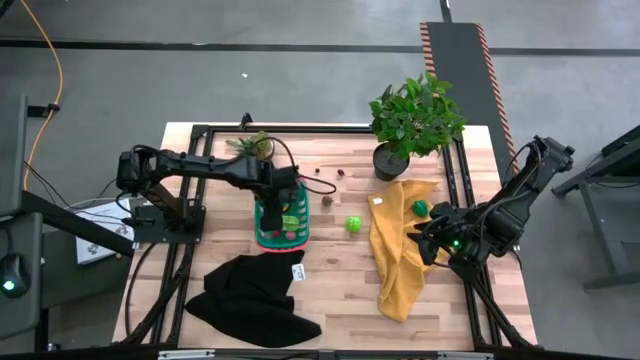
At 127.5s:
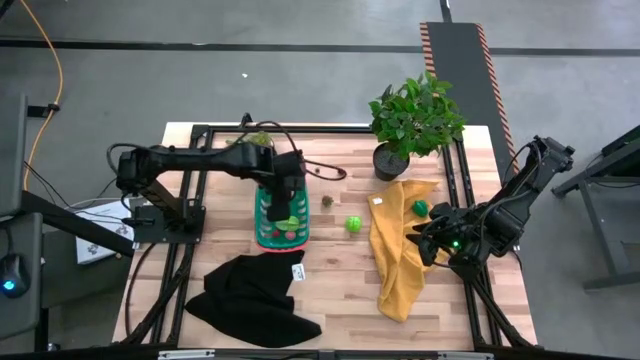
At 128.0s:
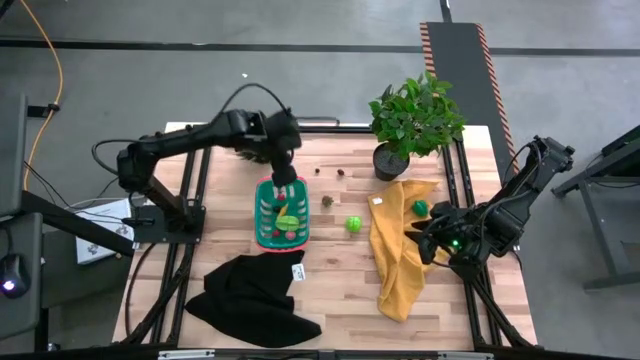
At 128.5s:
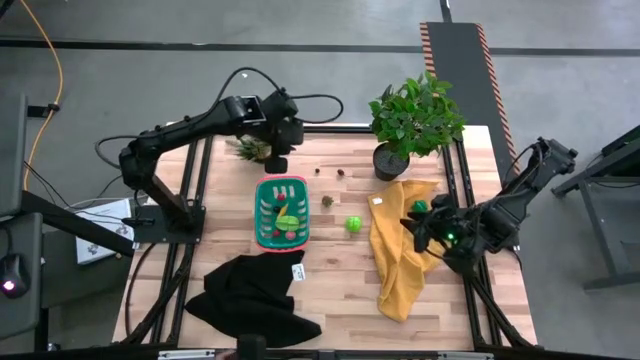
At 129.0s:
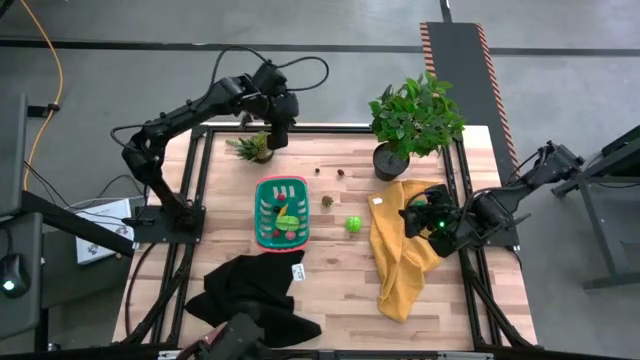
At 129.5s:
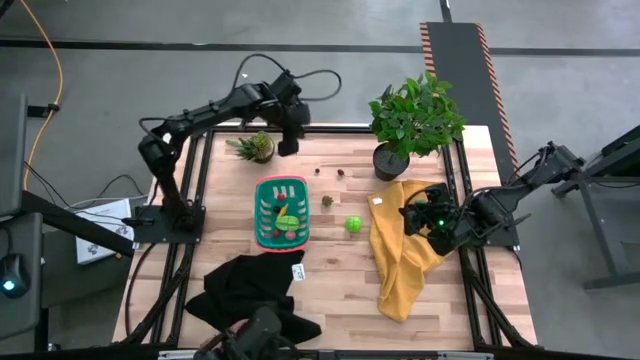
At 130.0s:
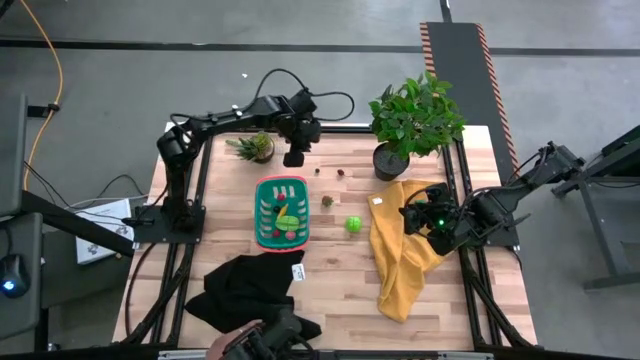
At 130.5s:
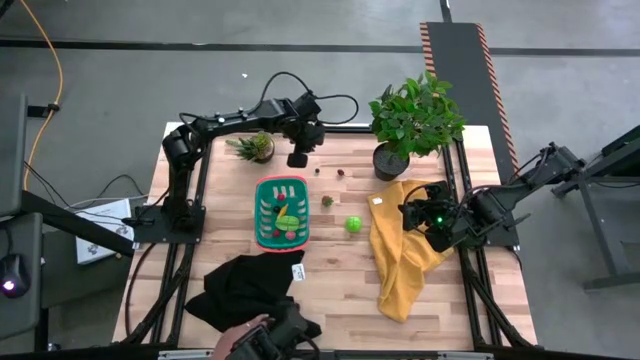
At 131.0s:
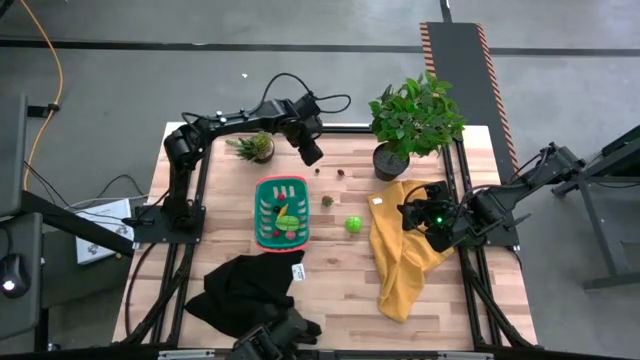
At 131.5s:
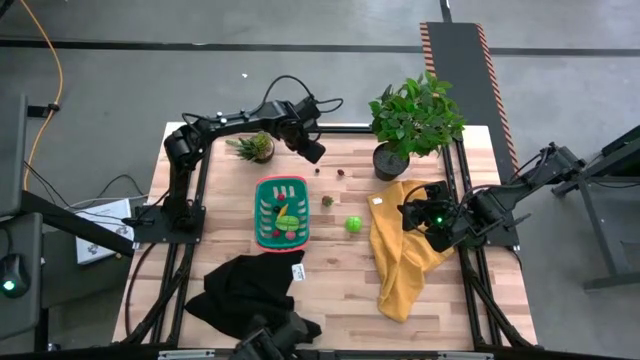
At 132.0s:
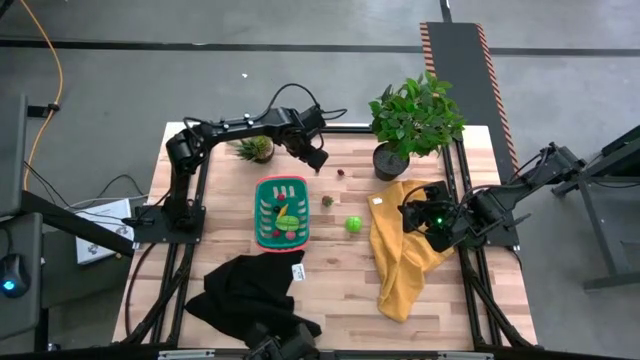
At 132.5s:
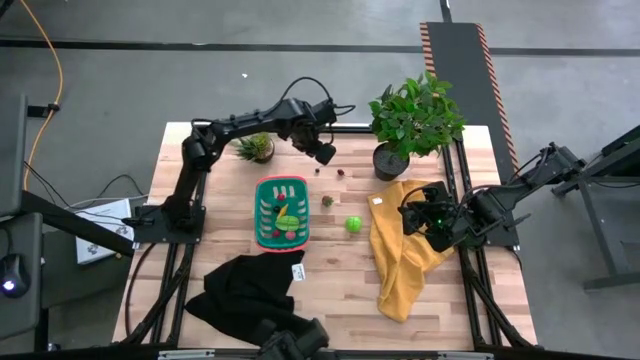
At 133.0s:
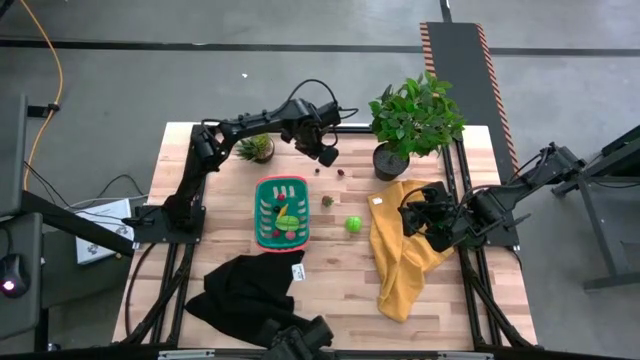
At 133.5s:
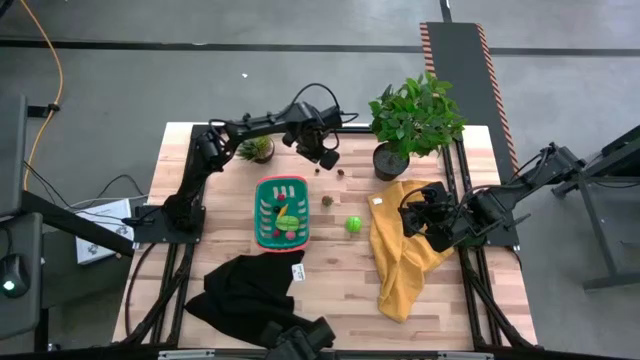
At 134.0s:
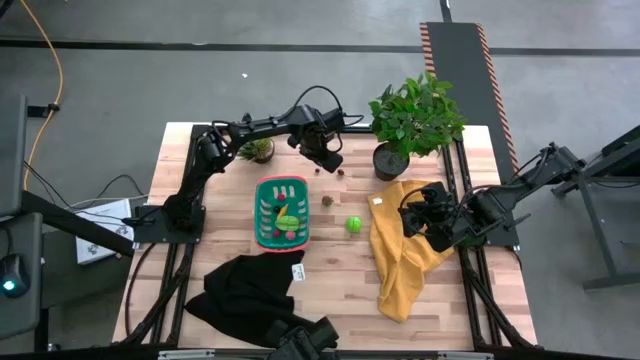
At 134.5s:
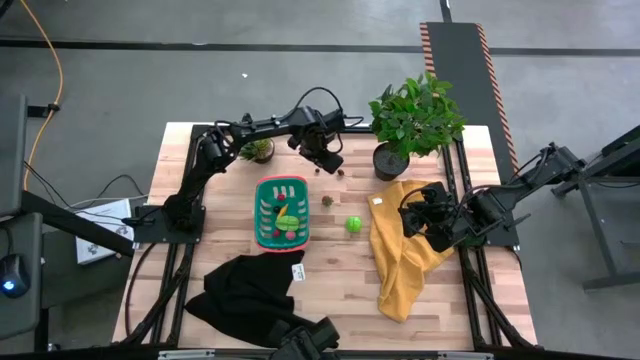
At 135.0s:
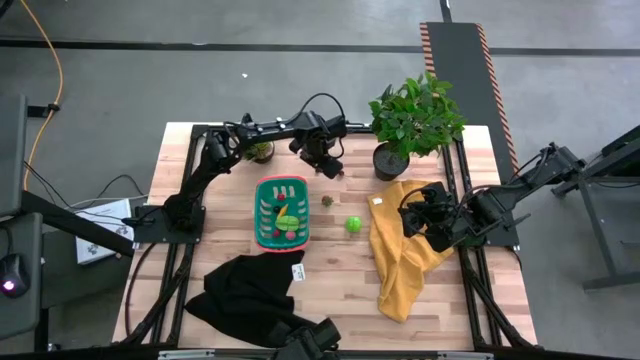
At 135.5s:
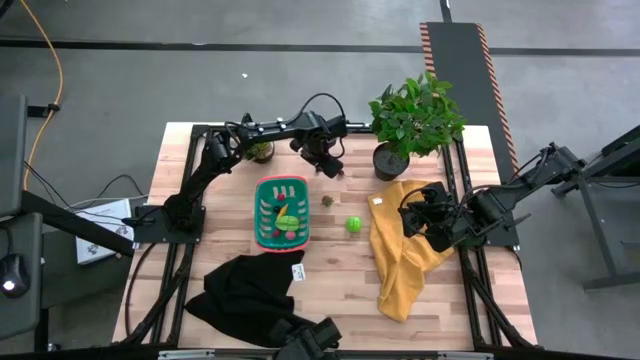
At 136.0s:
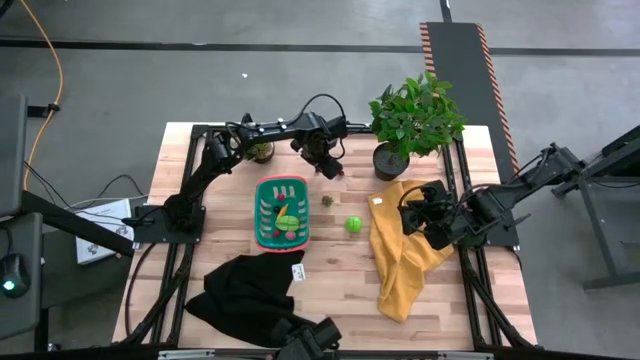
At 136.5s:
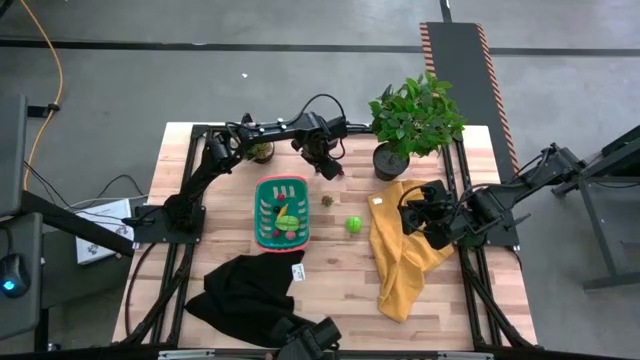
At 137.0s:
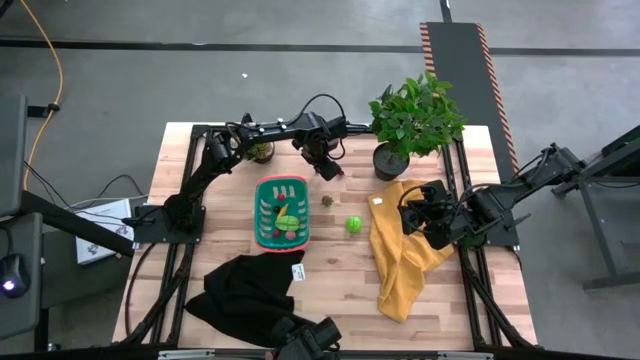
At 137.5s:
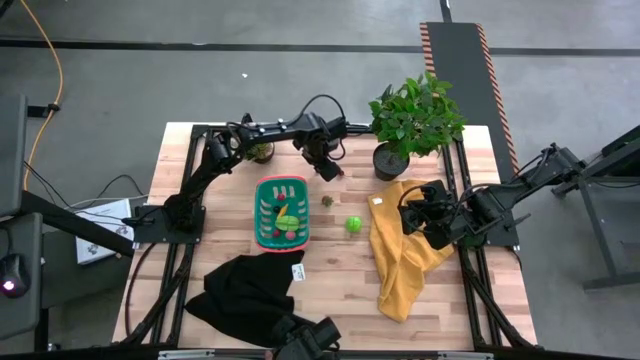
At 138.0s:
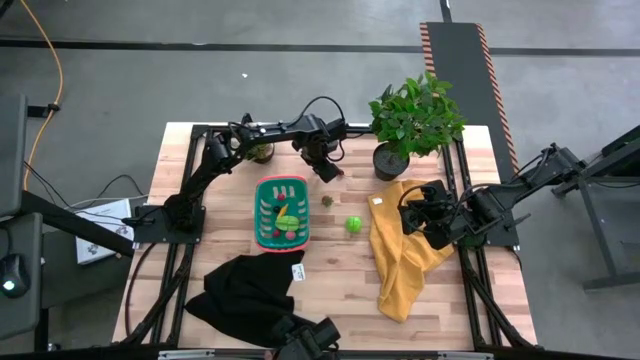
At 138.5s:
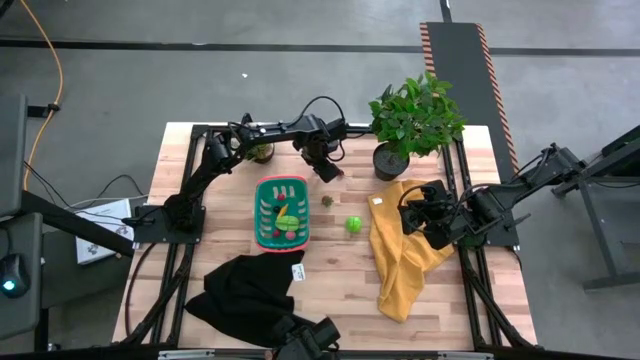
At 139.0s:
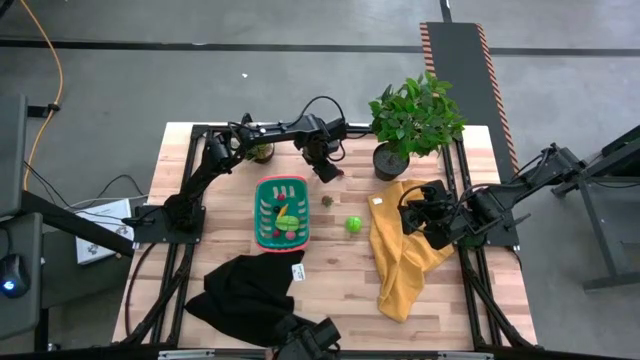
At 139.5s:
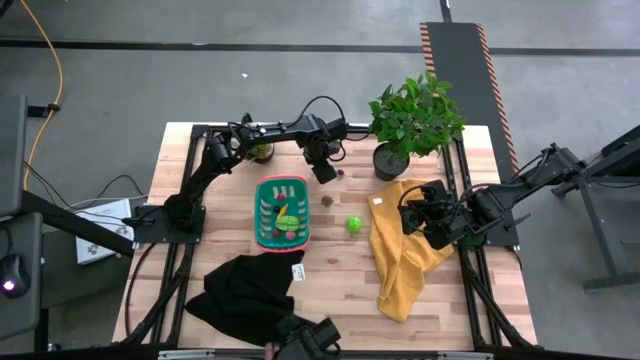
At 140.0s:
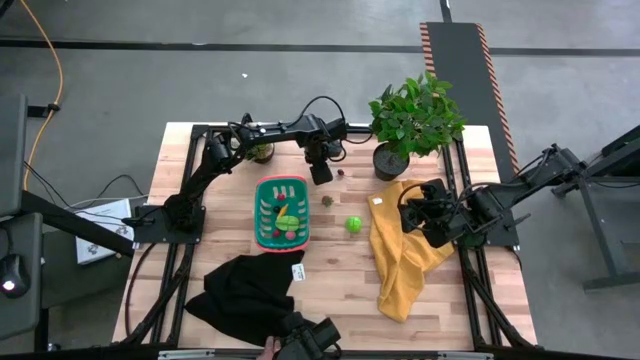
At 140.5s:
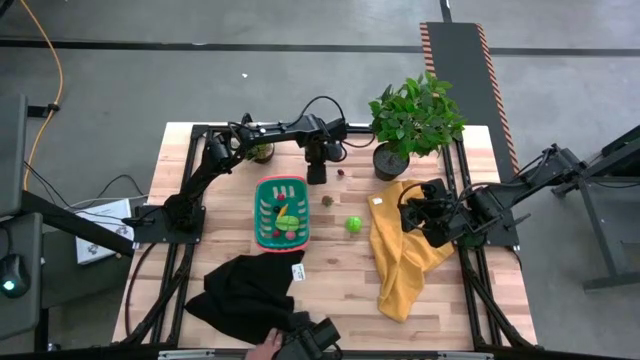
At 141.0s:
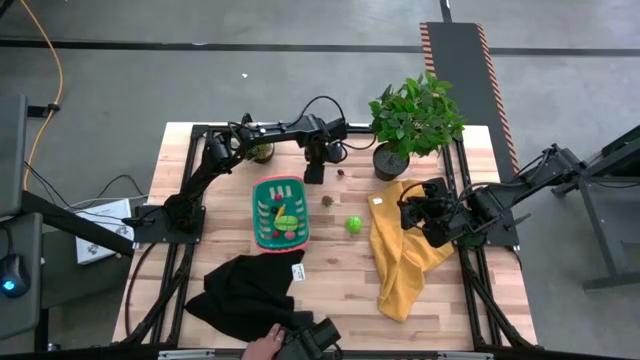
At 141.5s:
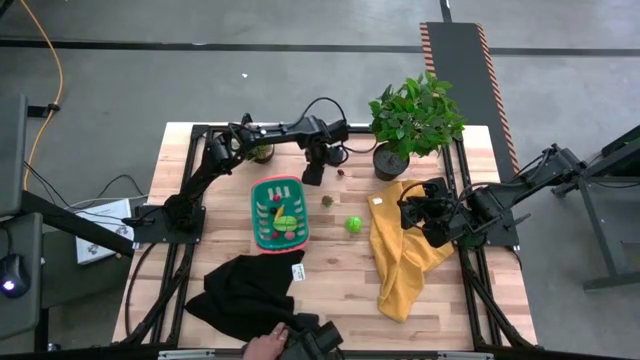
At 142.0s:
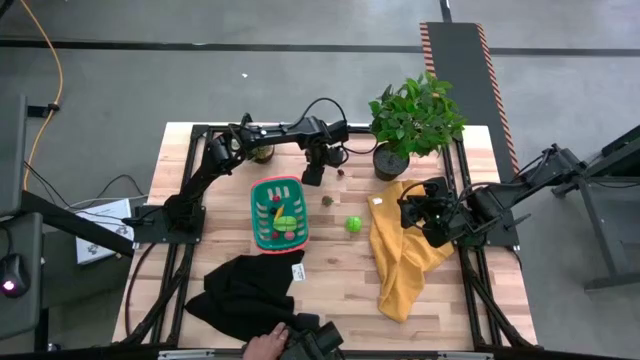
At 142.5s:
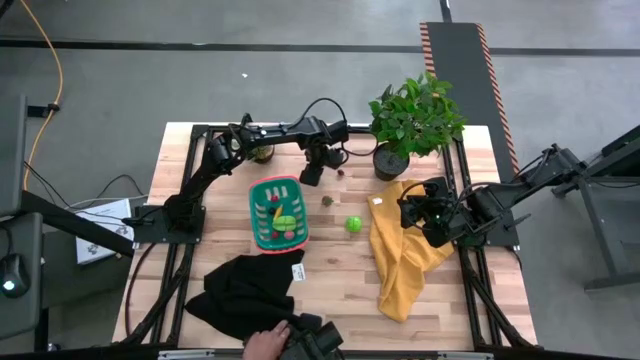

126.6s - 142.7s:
Task: Pick and placing Produce into tupperware
Put the blueberry in the green basket

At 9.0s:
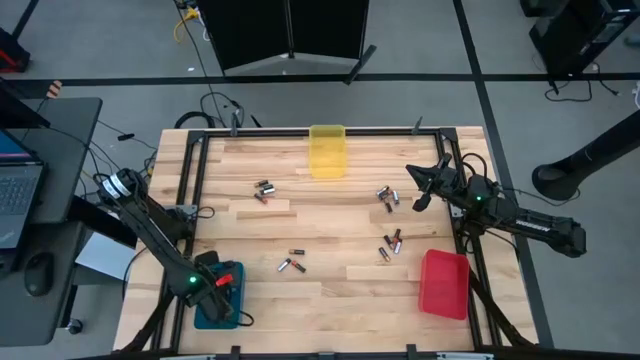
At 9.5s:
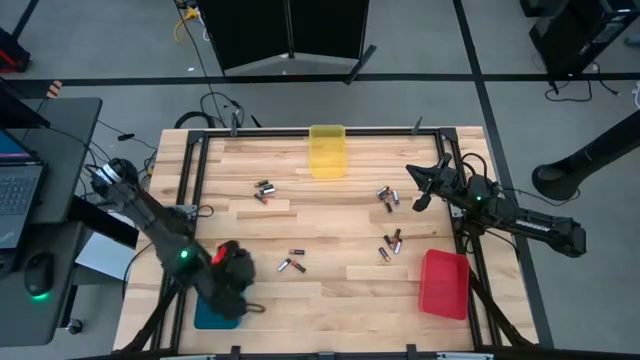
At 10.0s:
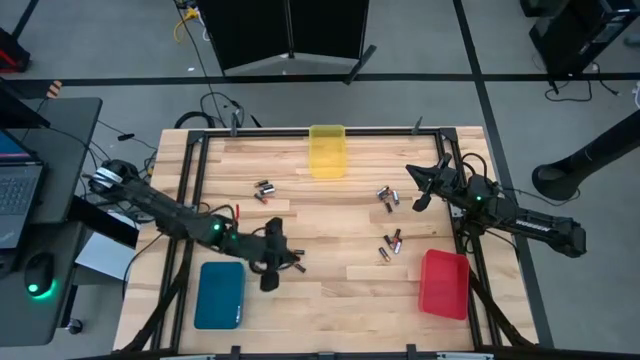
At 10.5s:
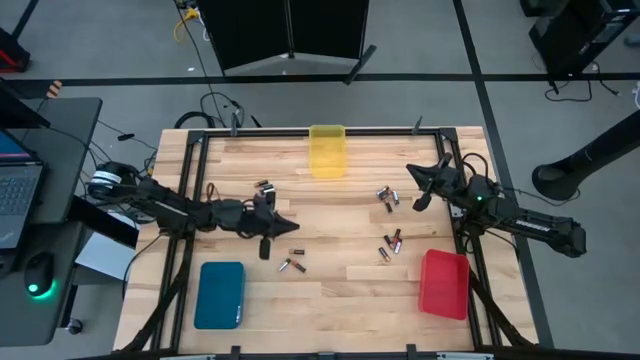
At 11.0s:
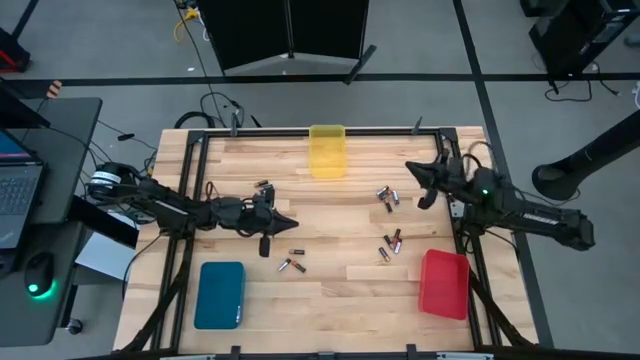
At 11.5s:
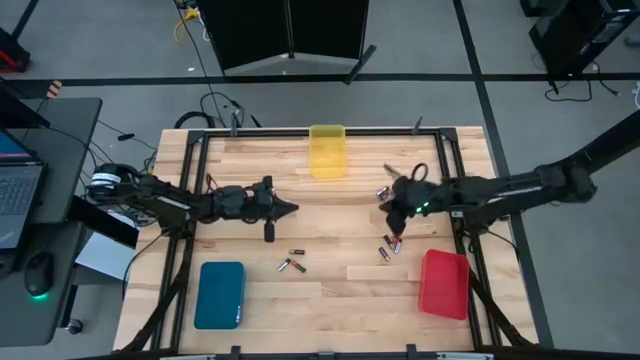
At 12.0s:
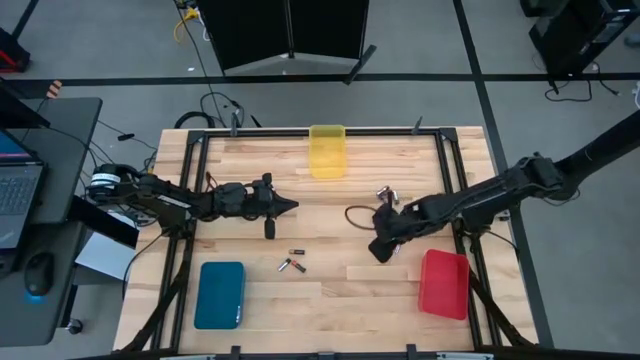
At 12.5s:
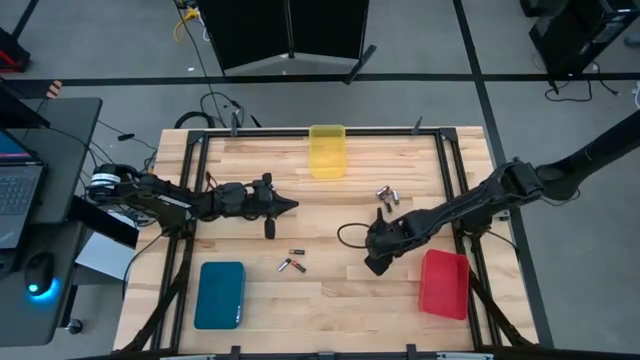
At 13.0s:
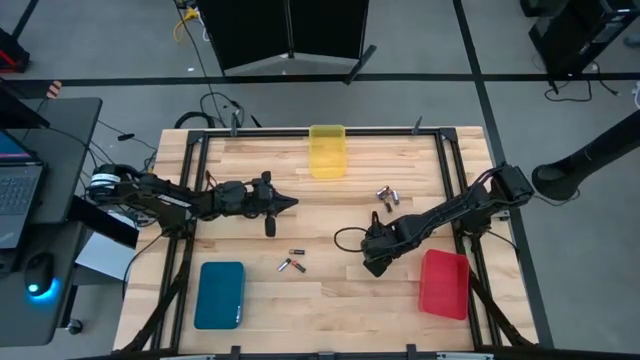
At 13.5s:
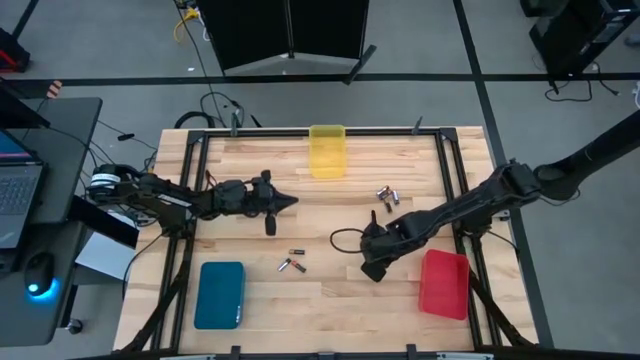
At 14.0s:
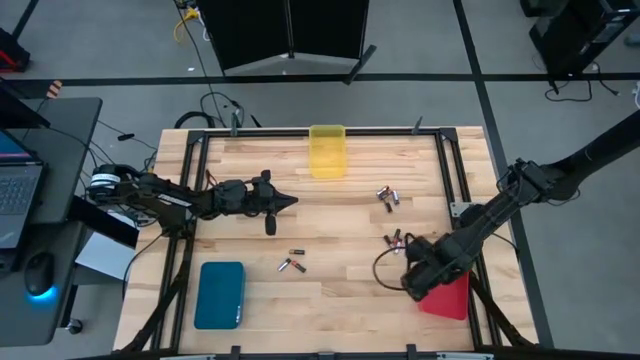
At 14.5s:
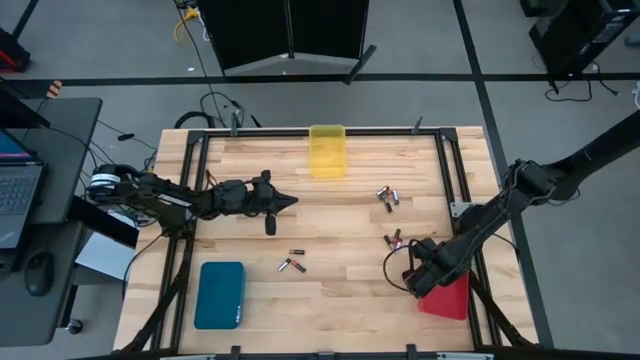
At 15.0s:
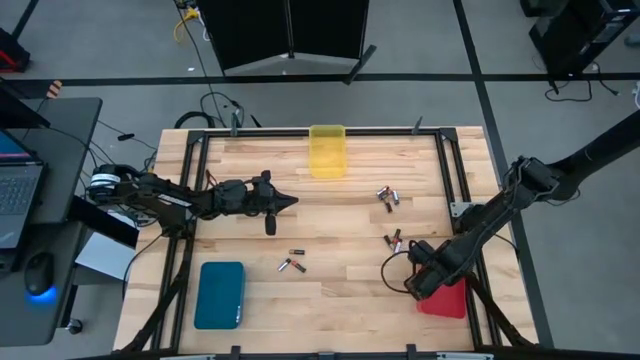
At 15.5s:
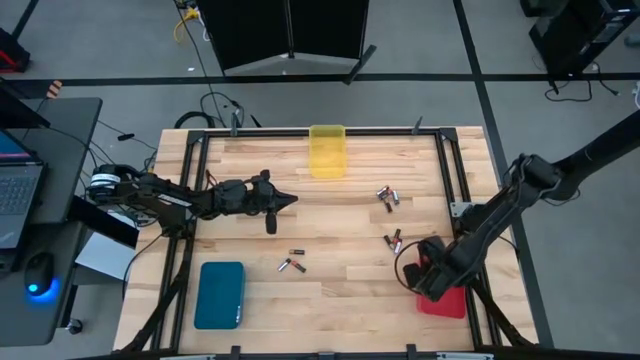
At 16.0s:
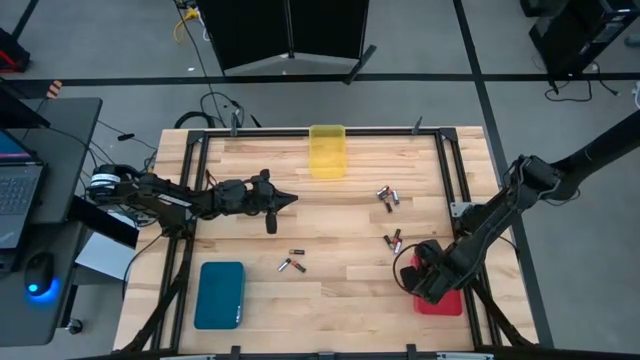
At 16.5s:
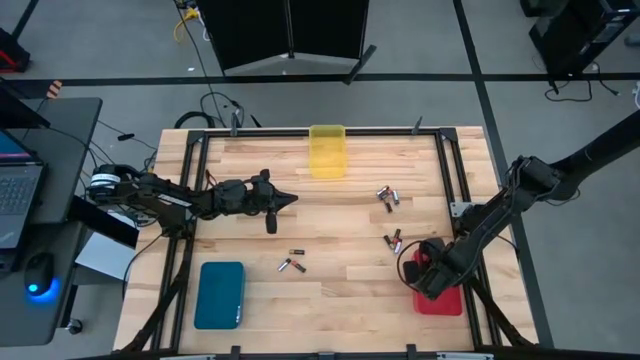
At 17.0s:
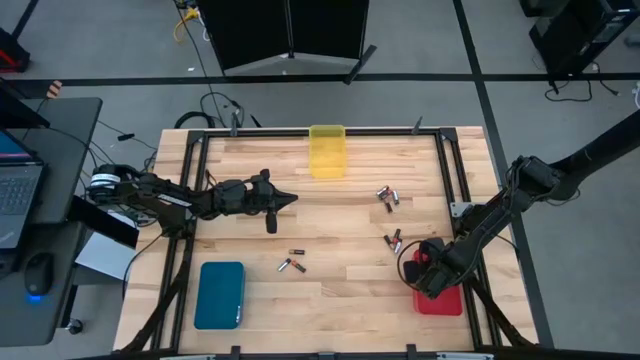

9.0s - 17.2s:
Task: Sort batteries
Put the golden battery into the red bin
